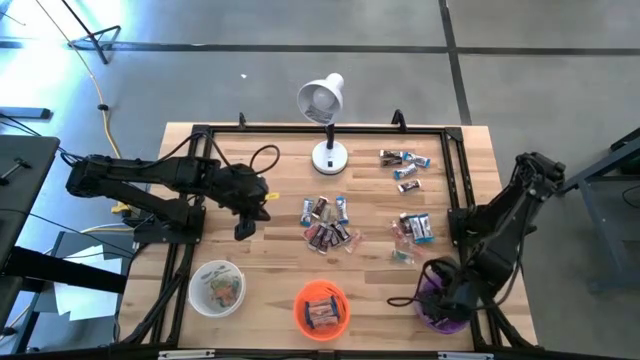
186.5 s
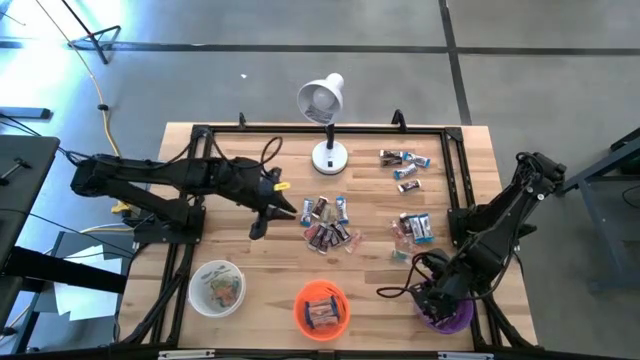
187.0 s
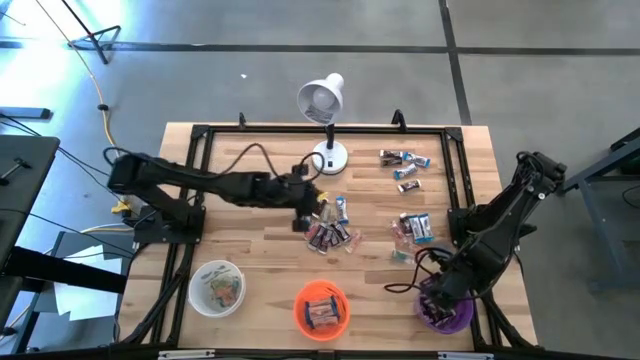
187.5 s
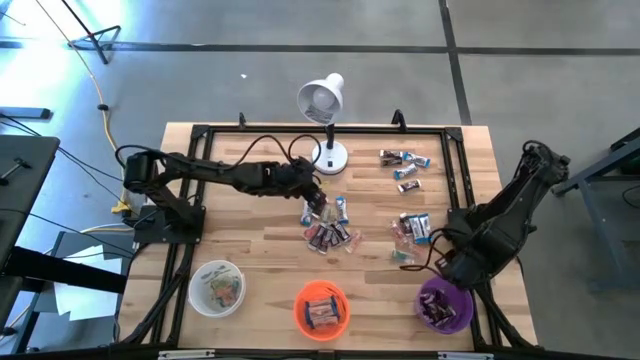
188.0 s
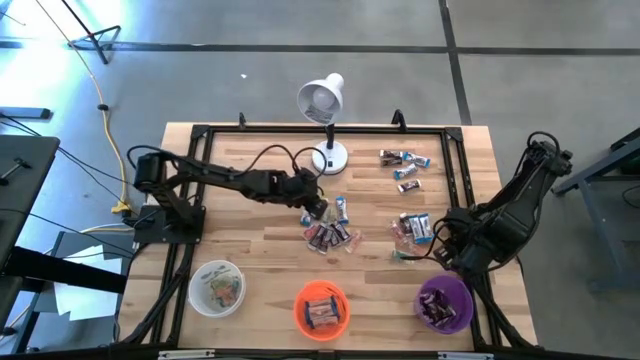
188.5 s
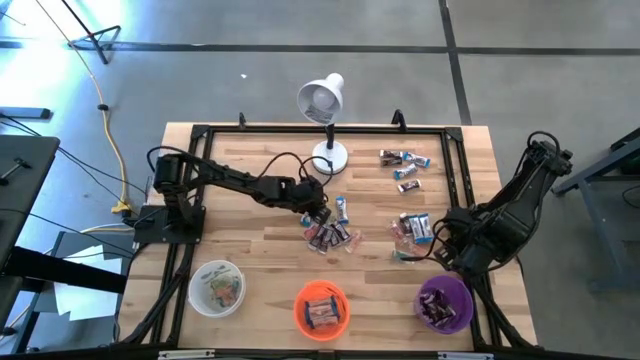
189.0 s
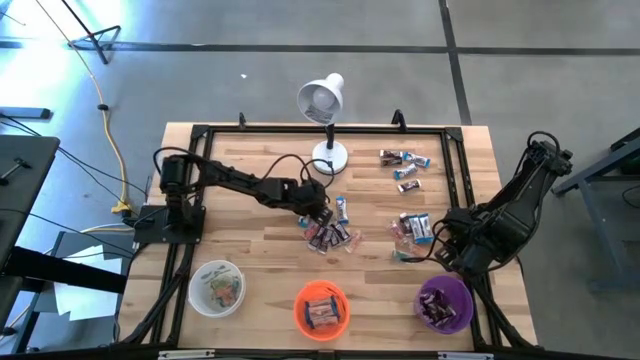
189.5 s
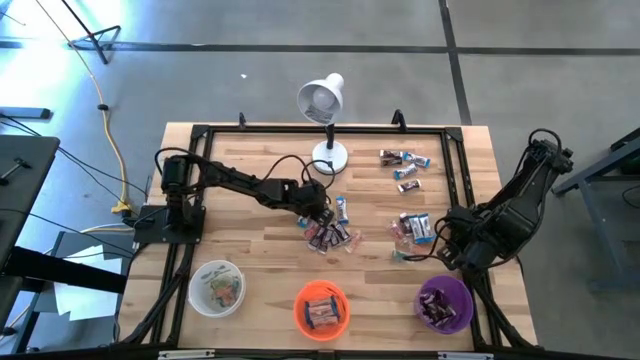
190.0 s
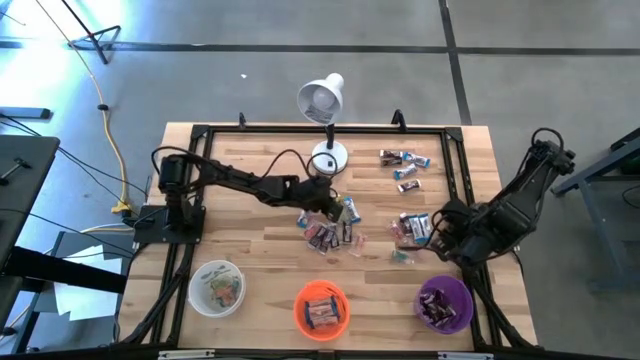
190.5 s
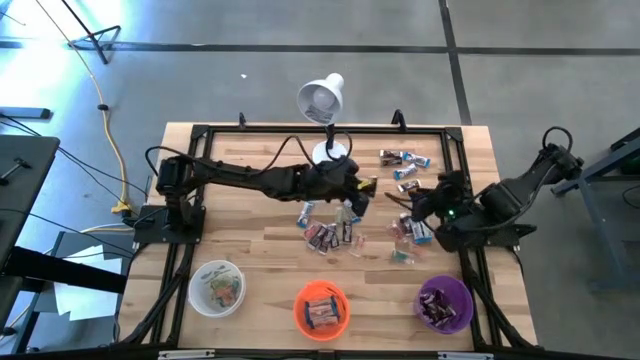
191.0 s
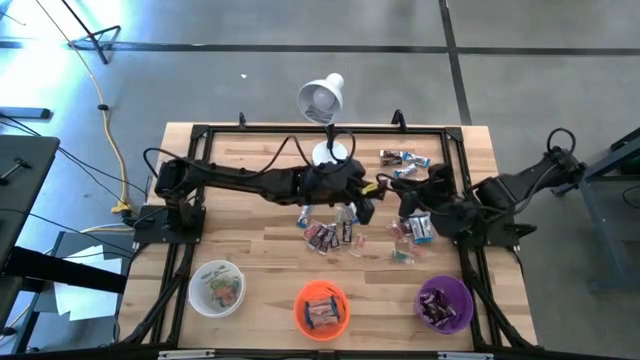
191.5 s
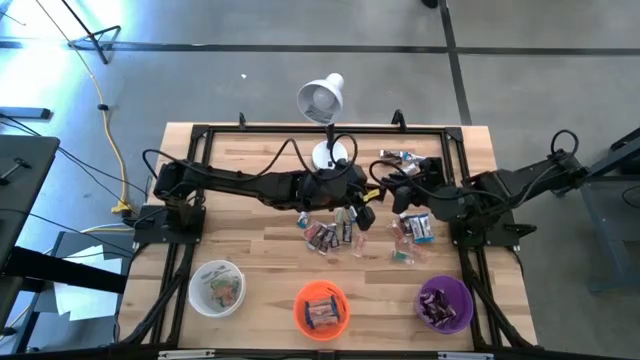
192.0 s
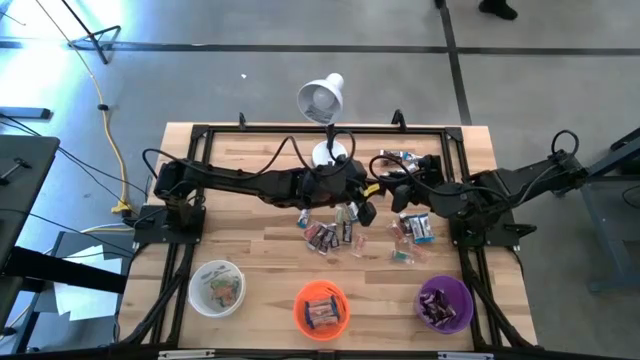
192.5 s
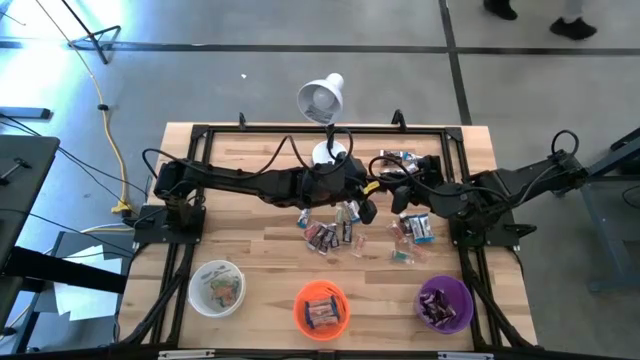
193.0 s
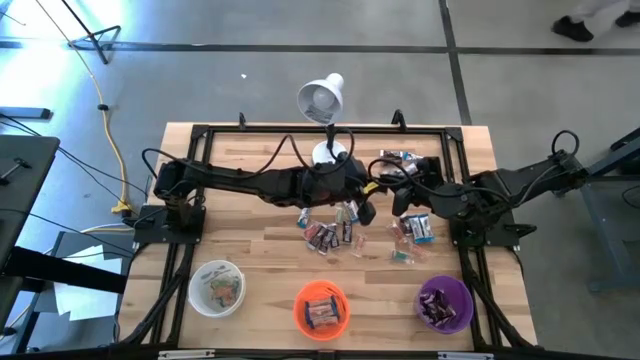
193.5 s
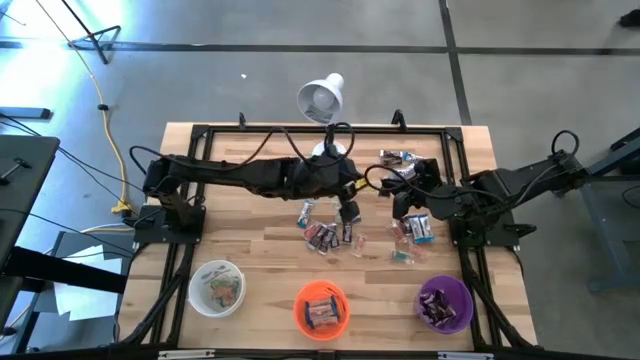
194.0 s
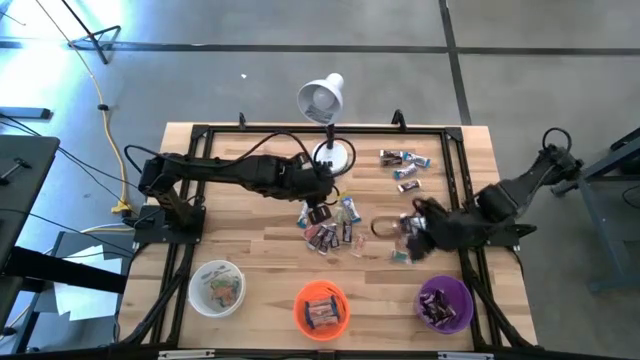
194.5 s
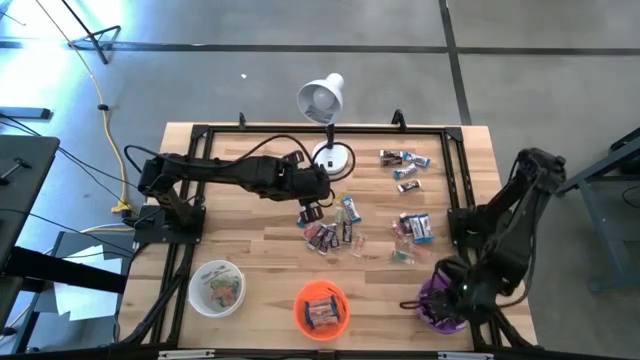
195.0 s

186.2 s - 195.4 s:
Task: Organize candy in baskets
Put the brown chocolate bar into the purple bucket

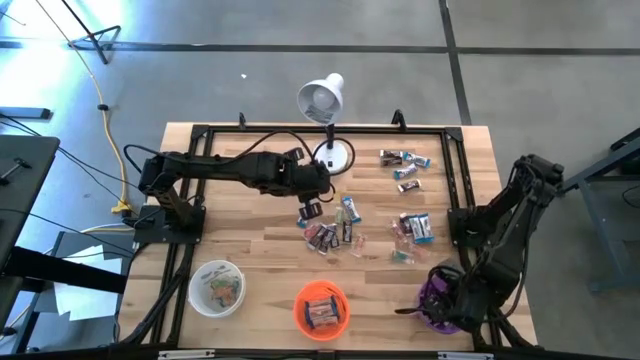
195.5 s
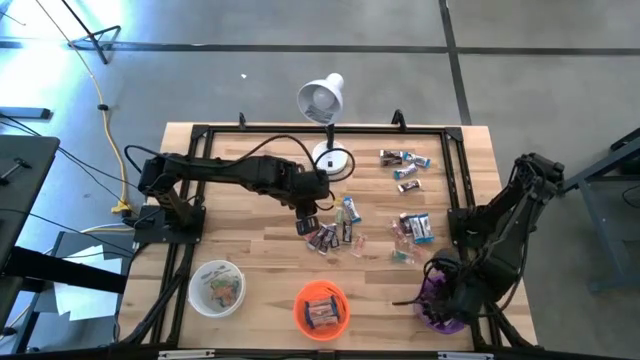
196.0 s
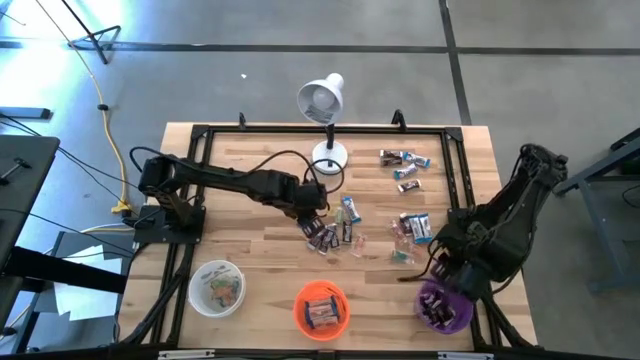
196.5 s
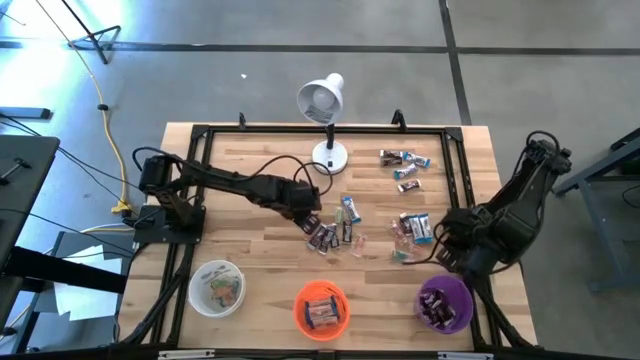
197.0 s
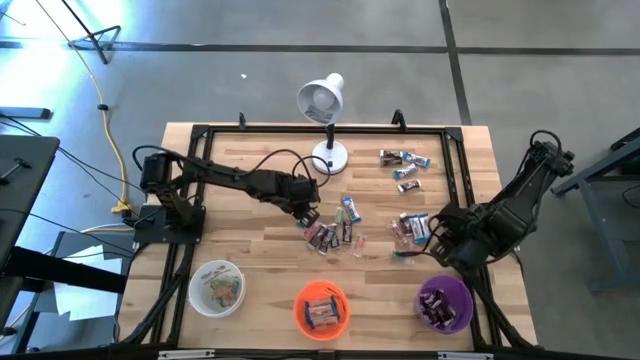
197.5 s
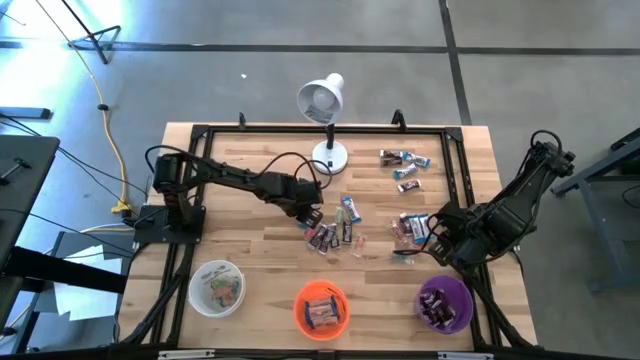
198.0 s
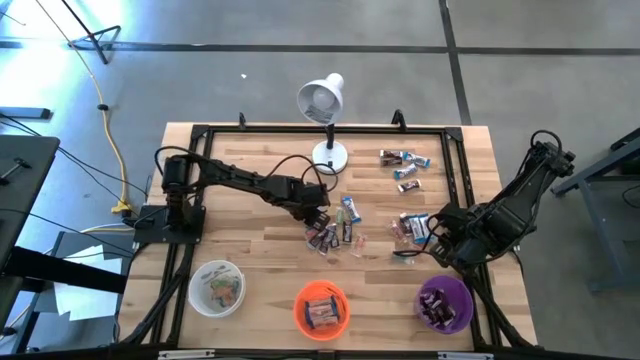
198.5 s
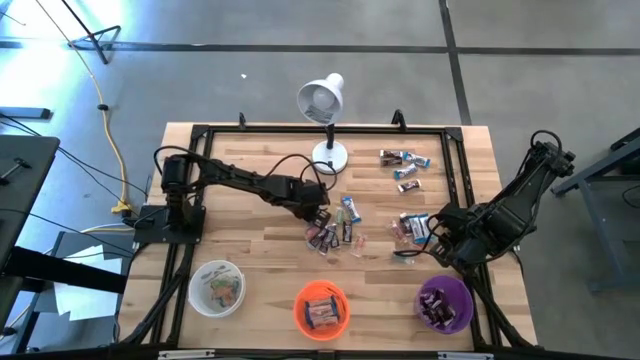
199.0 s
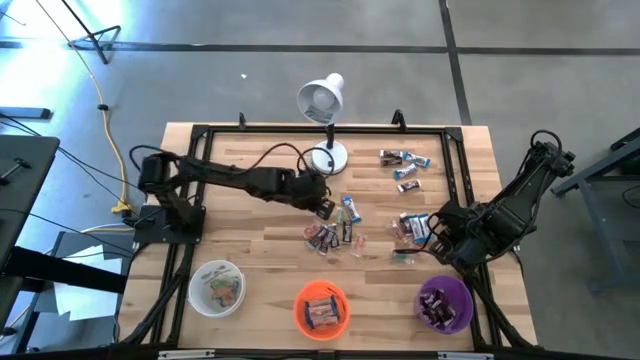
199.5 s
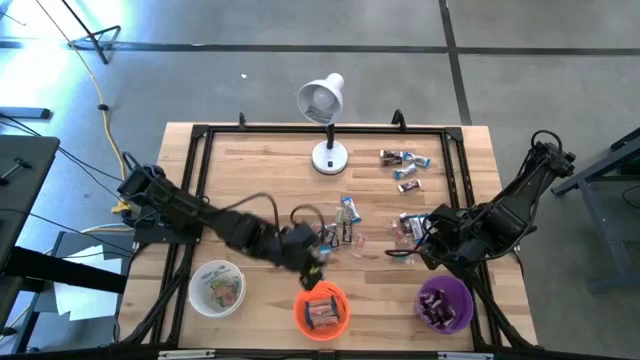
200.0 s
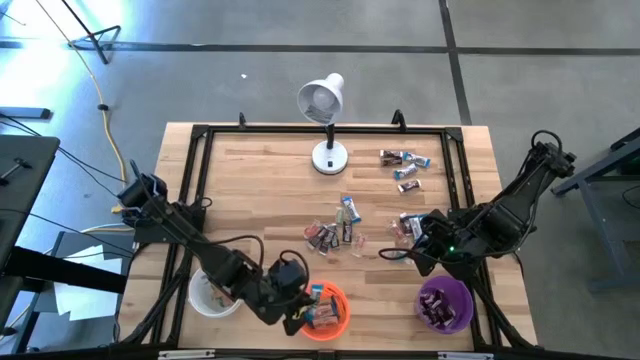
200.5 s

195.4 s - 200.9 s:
Put the white chocolate bar into the orange bucket

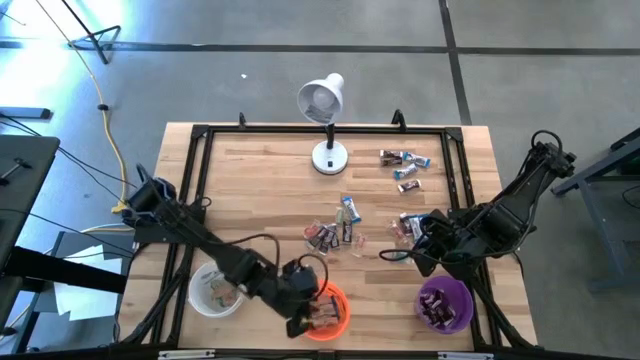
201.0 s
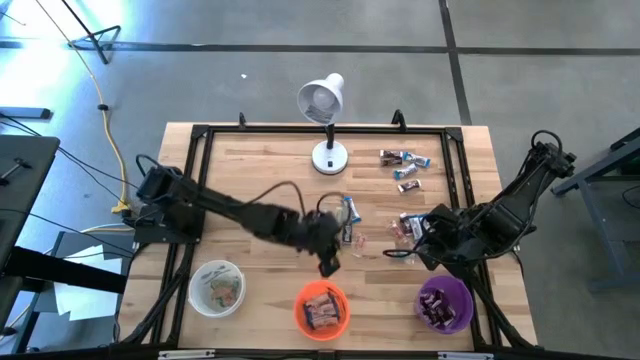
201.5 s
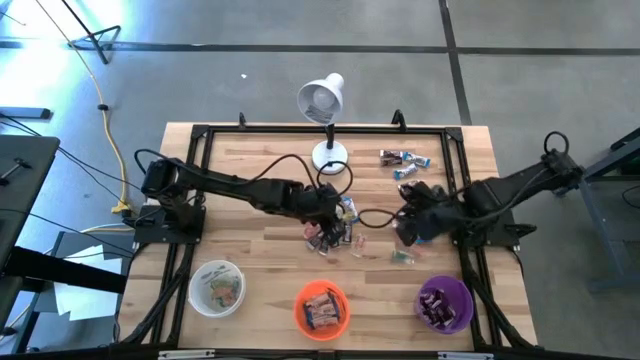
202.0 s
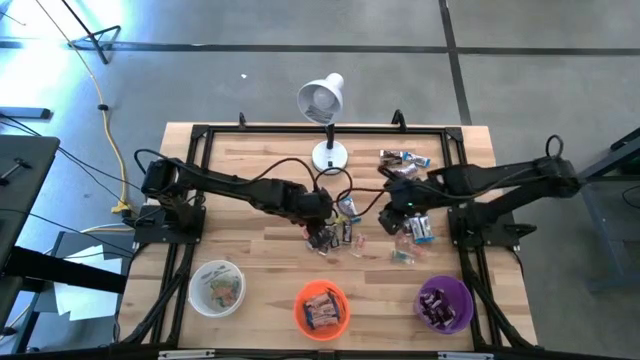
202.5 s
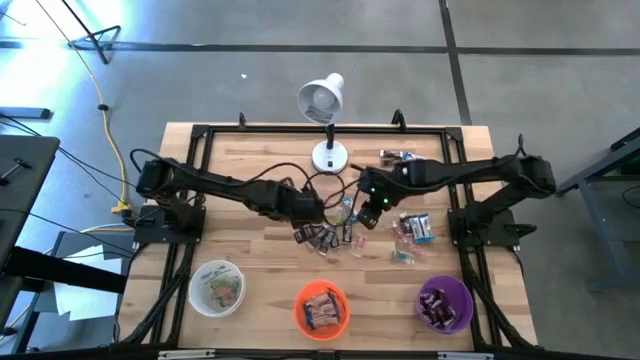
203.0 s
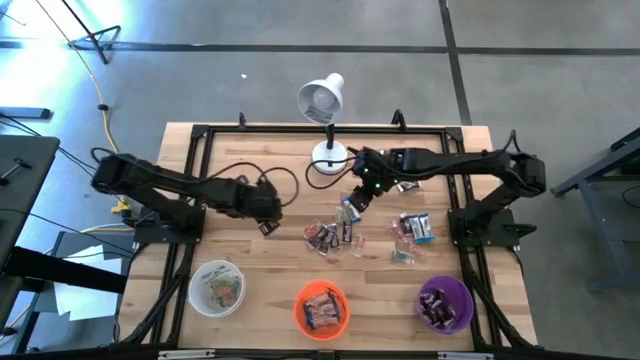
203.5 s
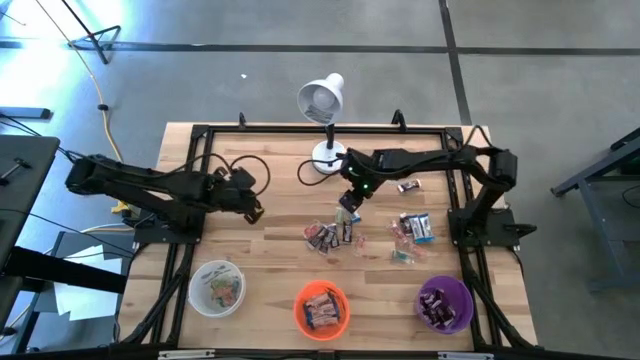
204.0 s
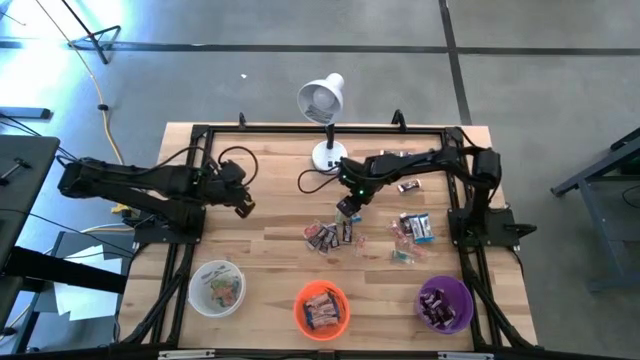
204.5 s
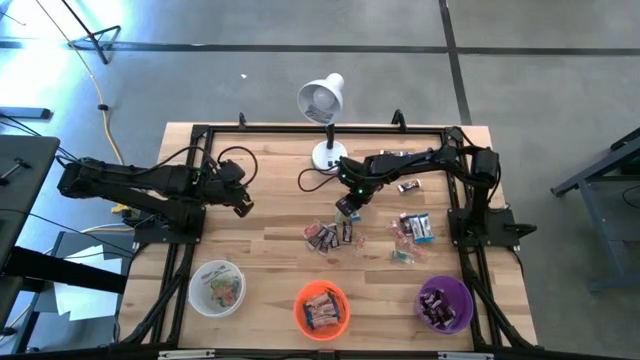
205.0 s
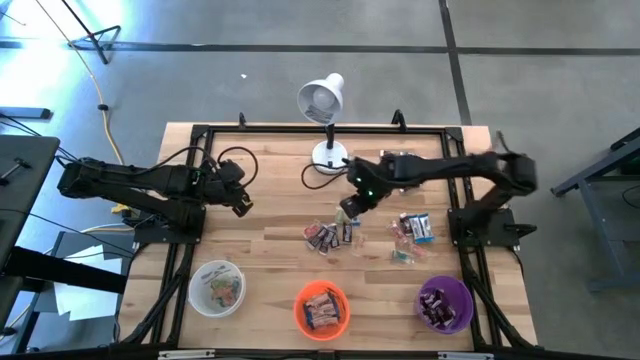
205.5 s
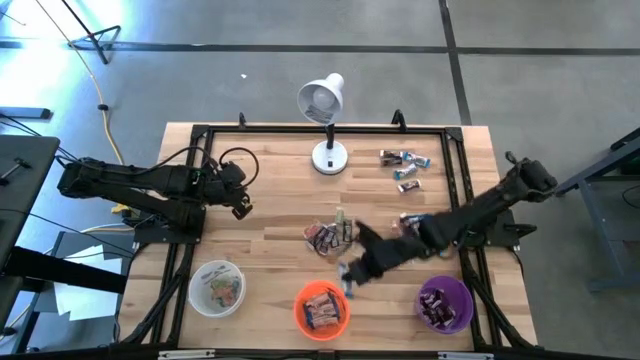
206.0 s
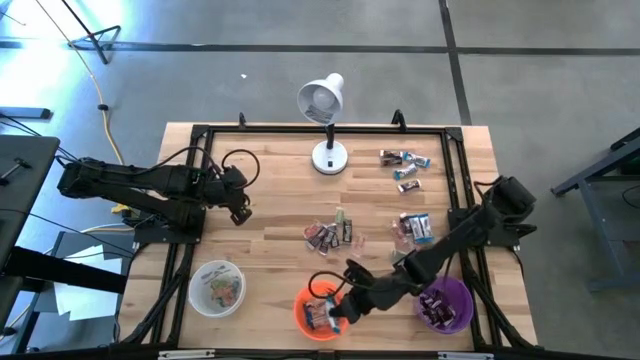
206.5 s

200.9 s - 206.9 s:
Put the white chocolate bar into the orange bucket

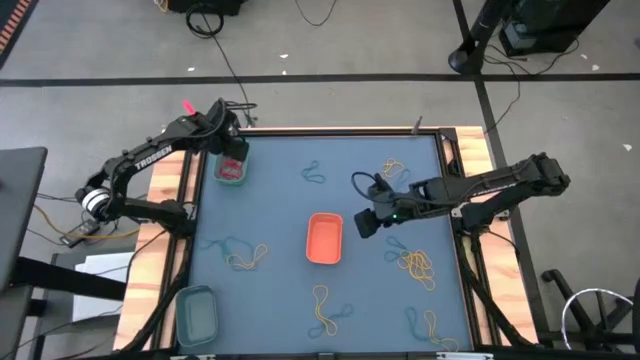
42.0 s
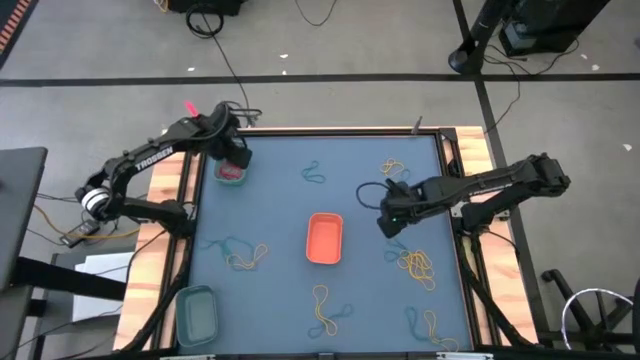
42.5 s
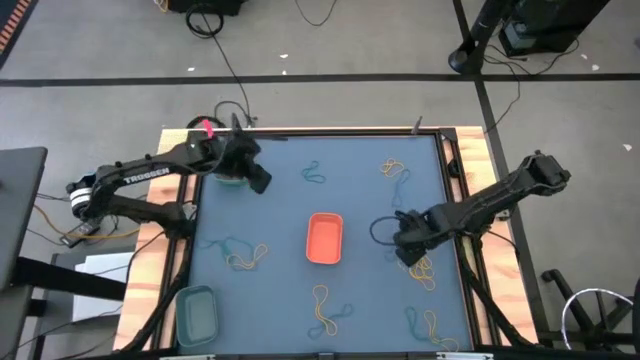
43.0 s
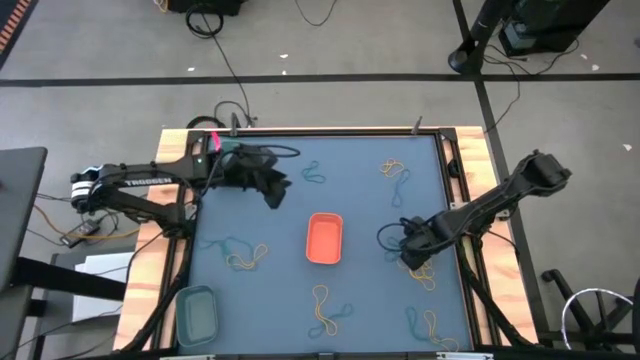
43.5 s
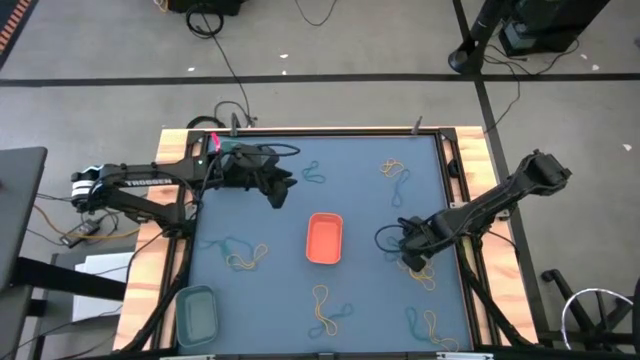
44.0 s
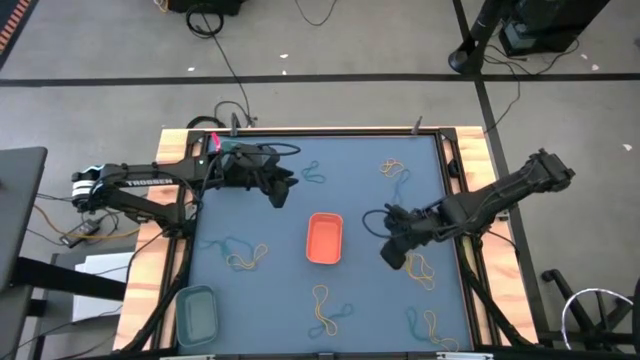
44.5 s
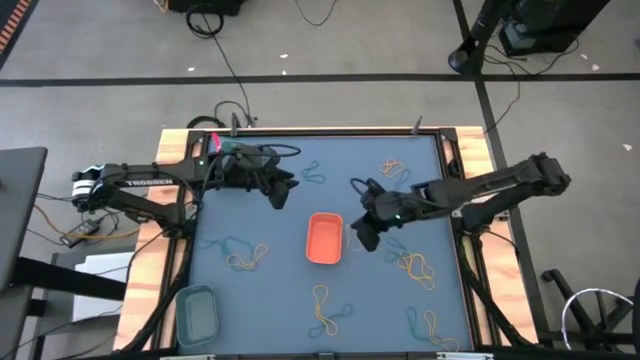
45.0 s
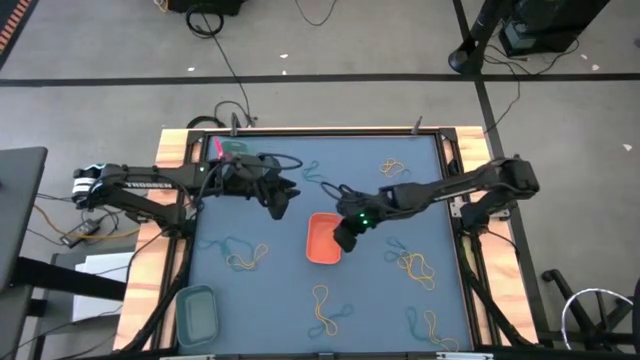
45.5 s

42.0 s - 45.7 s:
Task: Sort rubber bands into baskets
Put the yellow rubber band into the orange bin
